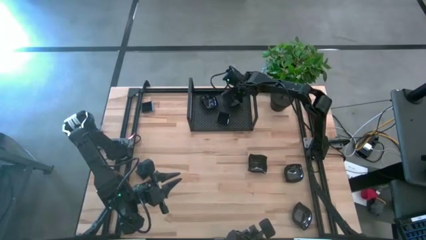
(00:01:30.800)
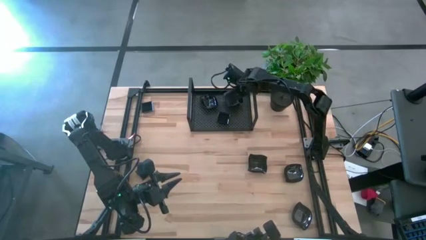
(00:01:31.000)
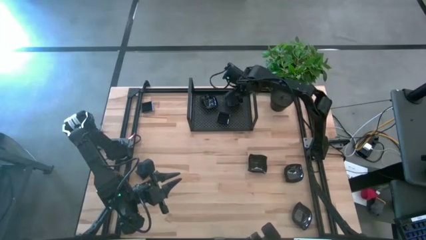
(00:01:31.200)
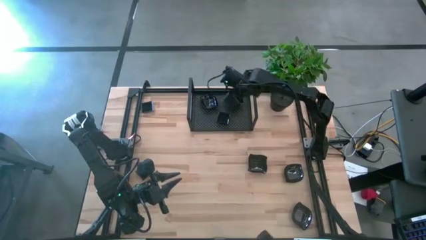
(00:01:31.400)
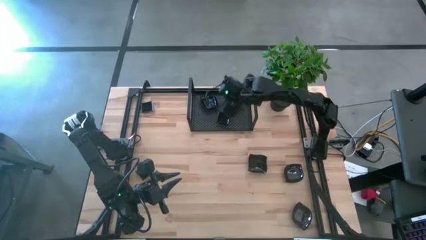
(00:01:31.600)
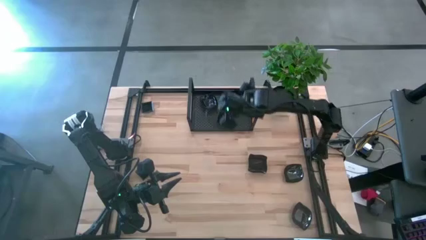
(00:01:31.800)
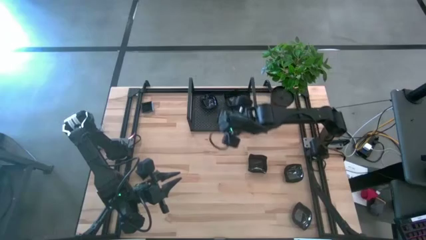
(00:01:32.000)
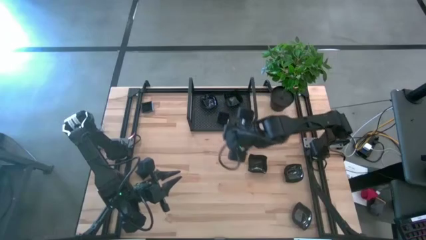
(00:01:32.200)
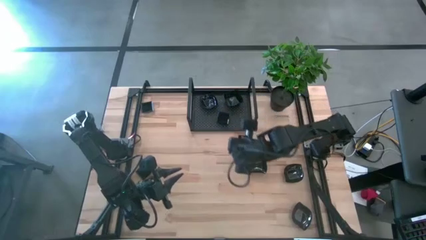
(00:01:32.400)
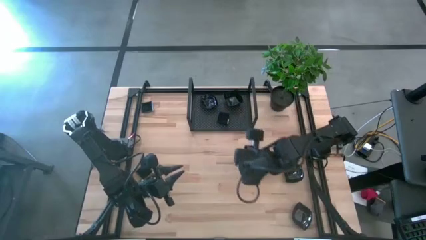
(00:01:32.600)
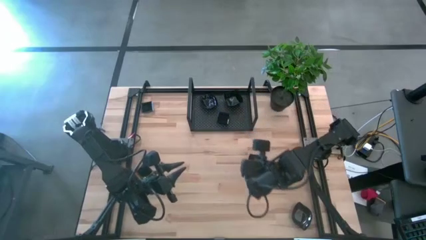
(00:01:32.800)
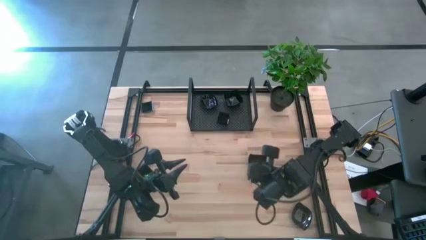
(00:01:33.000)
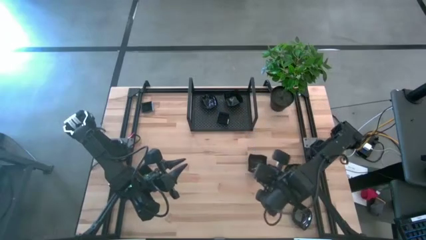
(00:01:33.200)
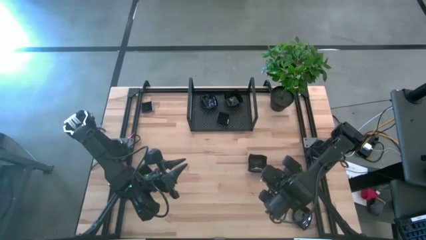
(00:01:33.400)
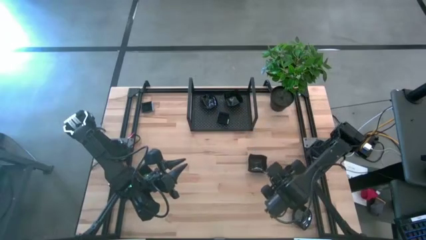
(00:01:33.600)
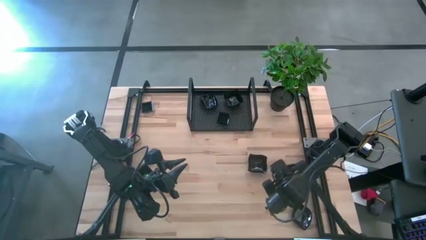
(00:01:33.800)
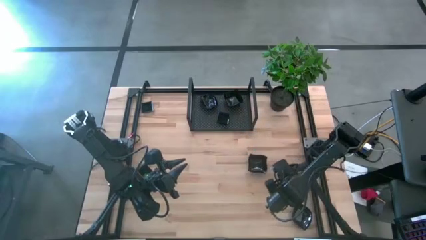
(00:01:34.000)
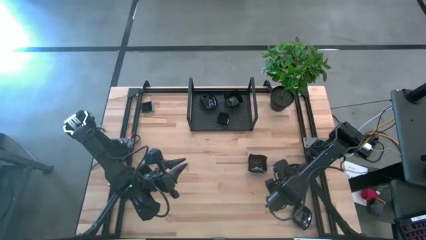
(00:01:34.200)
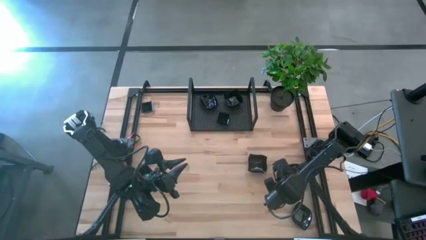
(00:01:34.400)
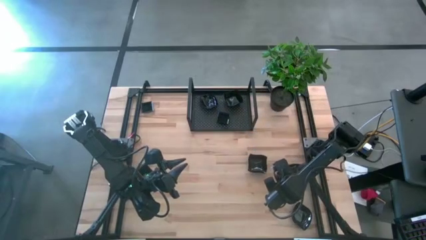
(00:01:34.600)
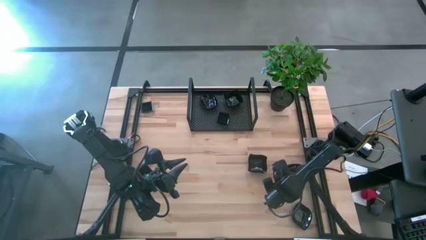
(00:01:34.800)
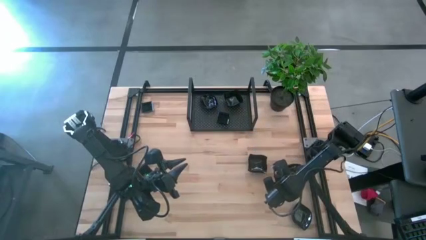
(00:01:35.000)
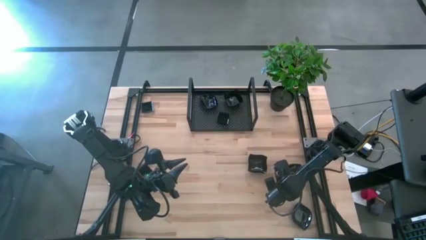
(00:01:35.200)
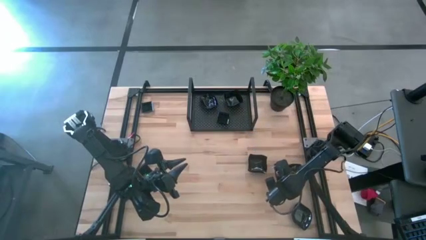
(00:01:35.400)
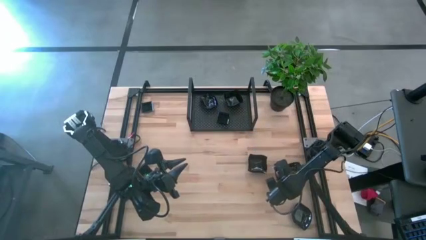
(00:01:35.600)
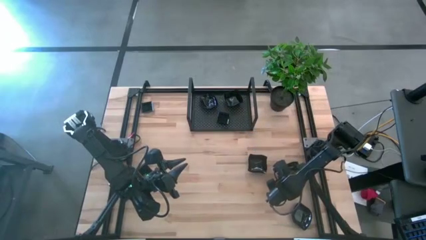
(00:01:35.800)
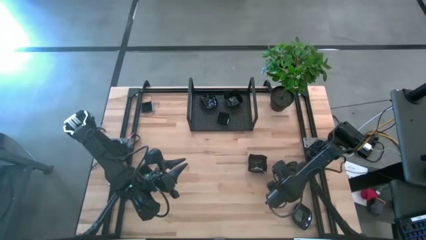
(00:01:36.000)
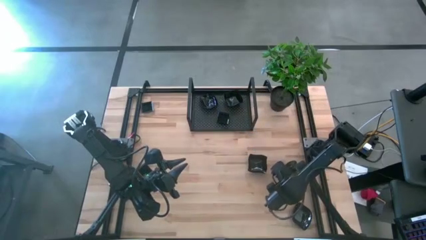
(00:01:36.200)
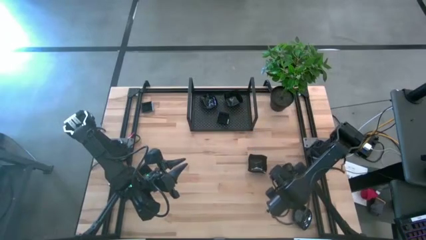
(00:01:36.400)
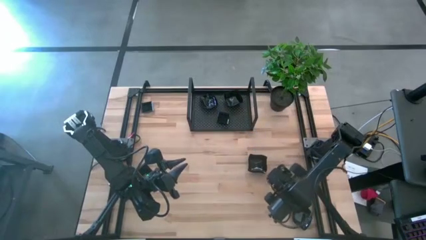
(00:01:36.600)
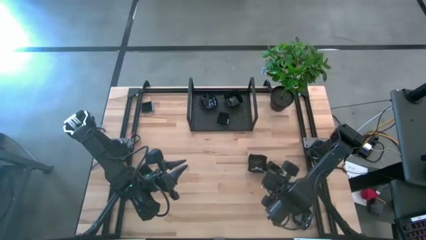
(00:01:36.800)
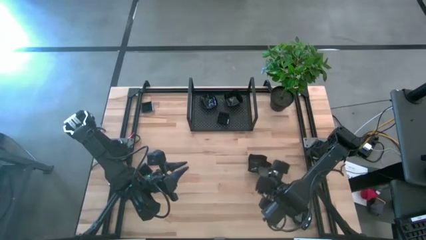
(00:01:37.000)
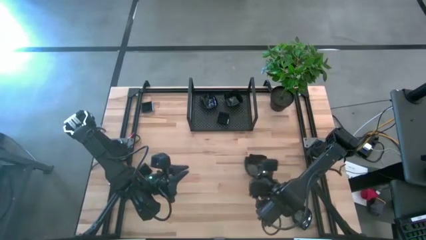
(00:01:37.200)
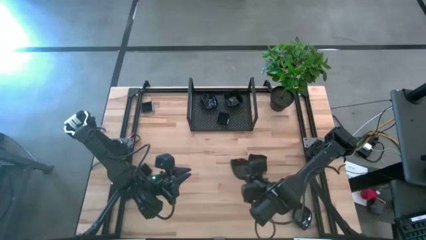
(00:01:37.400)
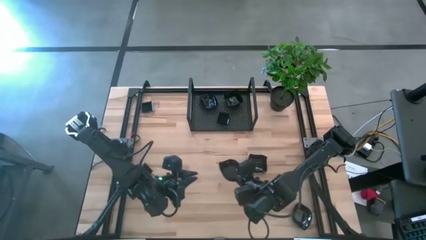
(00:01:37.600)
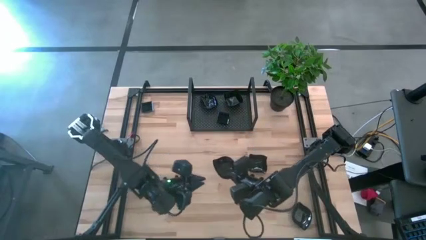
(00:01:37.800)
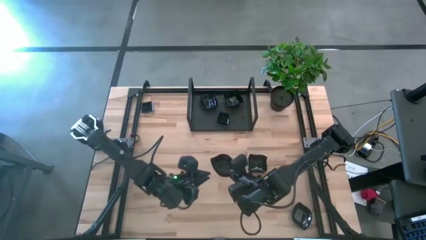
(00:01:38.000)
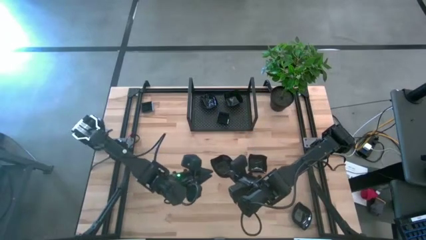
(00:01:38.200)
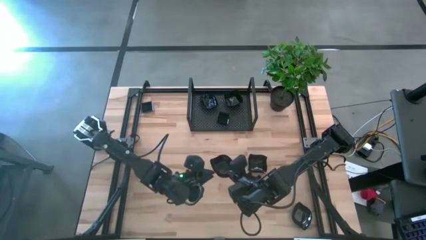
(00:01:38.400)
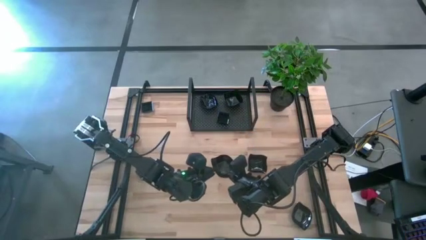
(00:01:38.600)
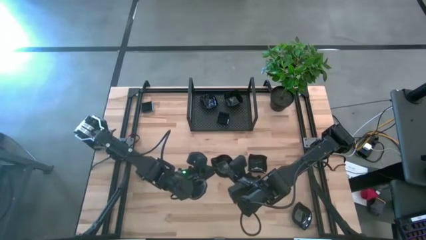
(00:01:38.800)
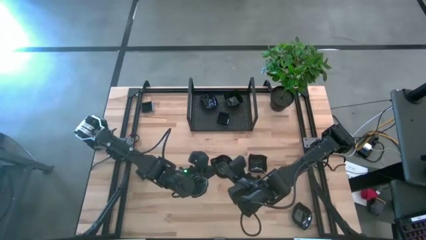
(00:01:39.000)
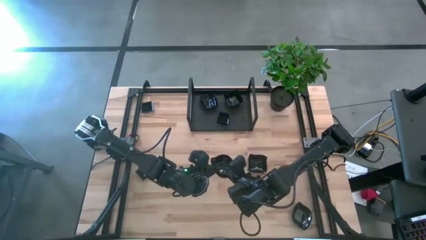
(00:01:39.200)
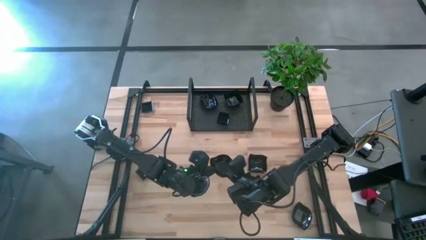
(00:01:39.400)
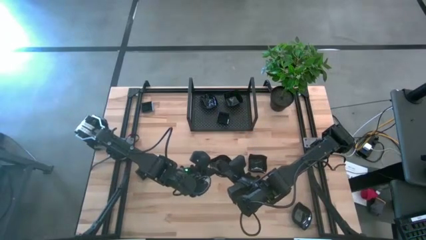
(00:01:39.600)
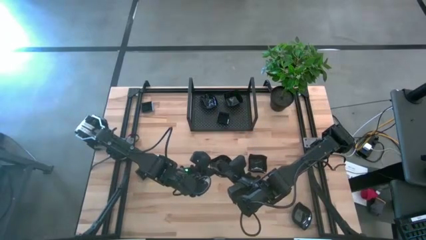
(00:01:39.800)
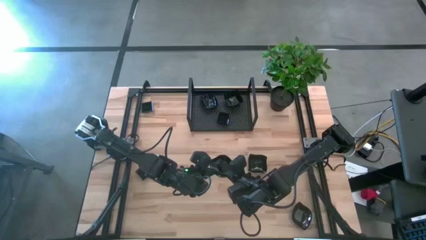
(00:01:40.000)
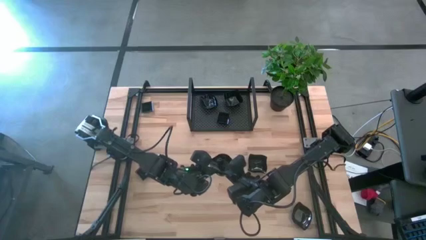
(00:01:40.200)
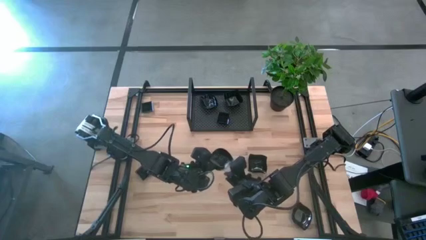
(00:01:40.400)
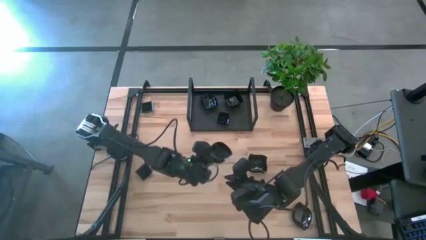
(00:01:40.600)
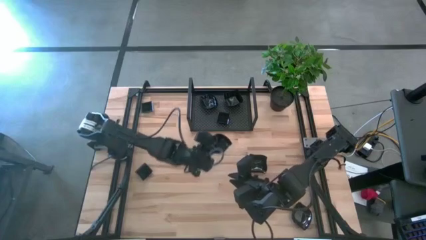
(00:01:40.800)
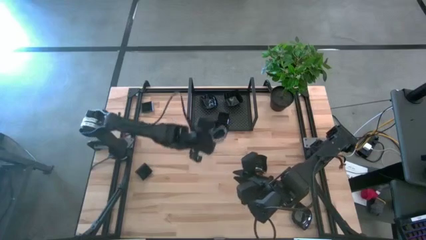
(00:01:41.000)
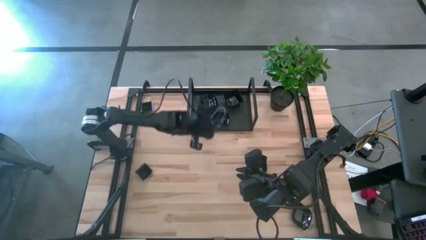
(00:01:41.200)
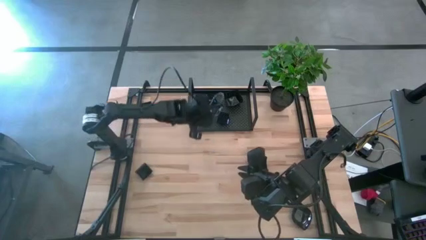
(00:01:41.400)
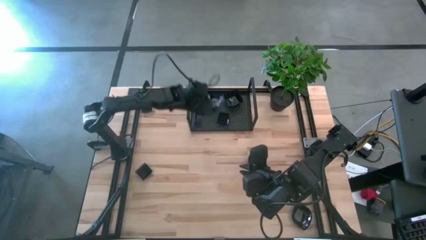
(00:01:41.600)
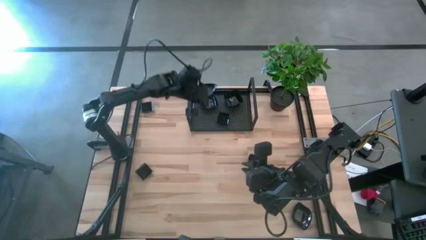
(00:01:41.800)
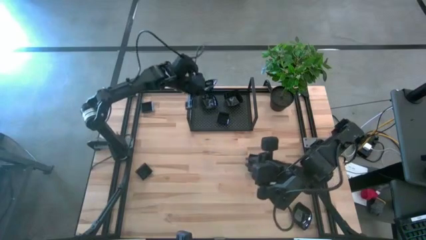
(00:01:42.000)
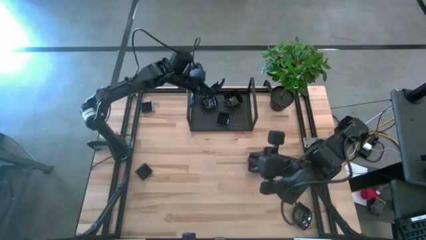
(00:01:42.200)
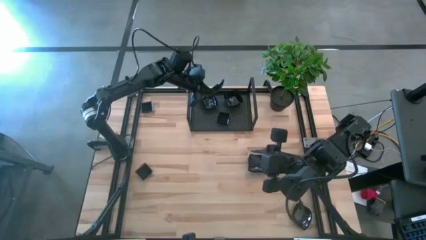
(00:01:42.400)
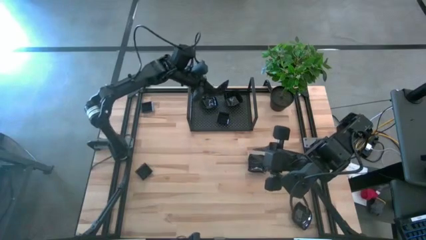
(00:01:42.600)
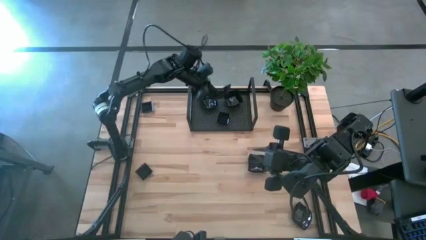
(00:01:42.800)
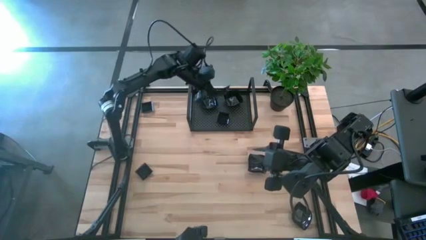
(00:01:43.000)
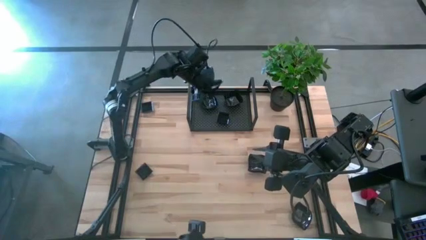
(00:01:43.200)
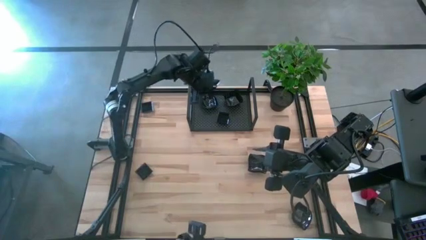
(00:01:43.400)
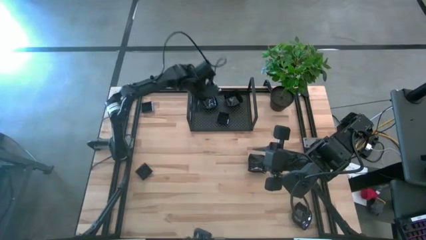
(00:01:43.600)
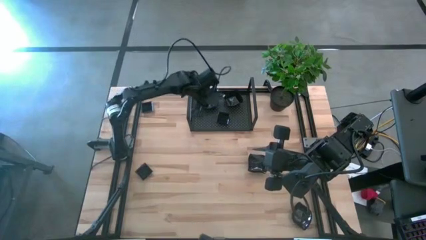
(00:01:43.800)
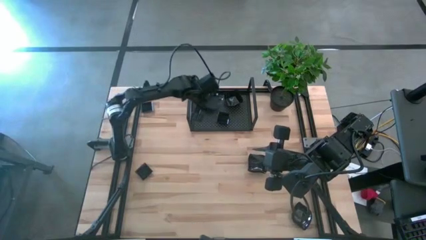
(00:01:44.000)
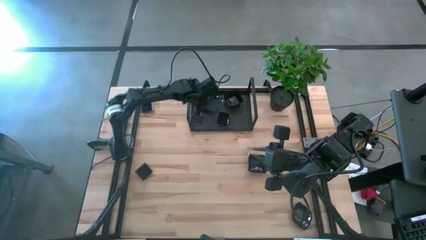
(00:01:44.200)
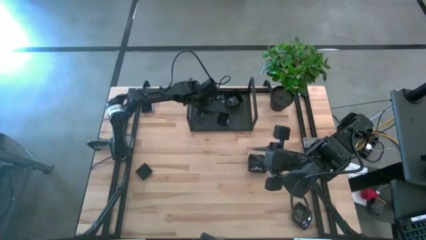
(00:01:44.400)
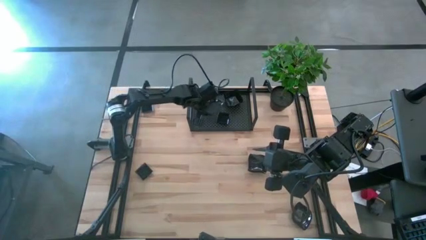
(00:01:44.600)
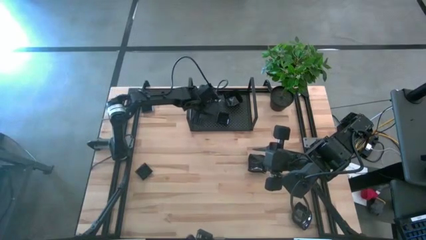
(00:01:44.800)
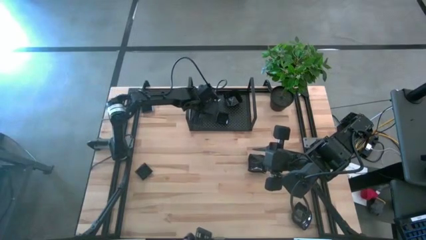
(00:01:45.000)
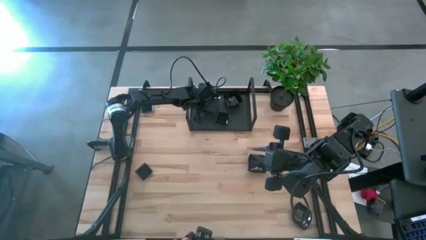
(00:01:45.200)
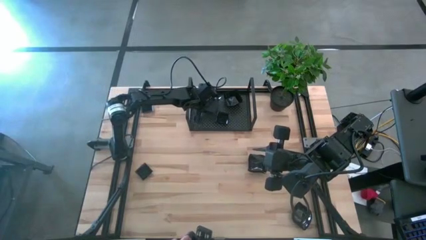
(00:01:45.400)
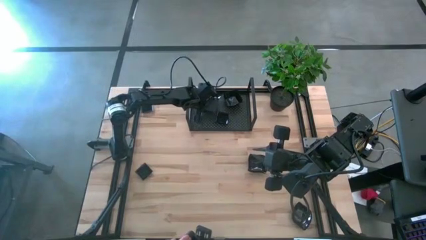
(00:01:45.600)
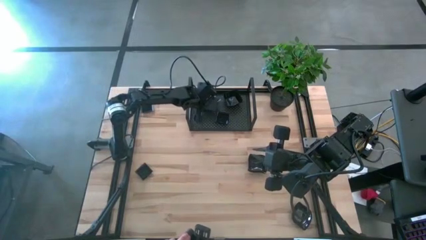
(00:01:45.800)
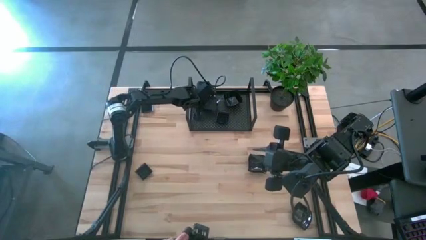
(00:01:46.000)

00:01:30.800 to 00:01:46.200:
Task: Pick & Place Mini shaped plates
Stack the black leaf-shaped plate on top of the black leaf-shaped plate on the shelf
